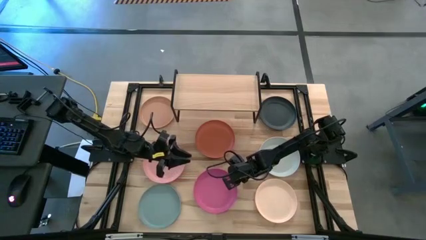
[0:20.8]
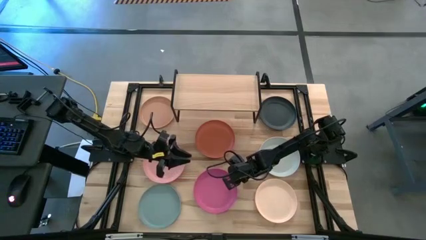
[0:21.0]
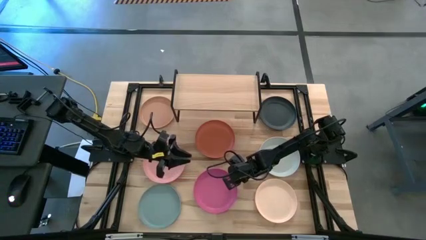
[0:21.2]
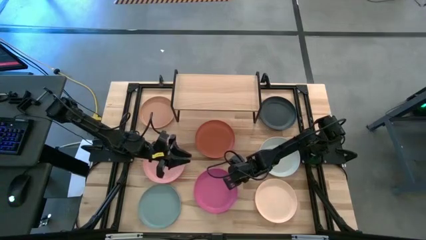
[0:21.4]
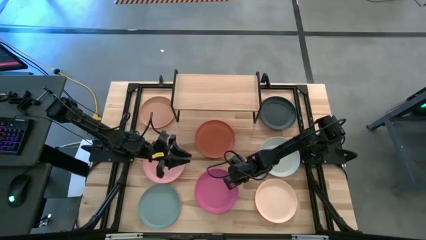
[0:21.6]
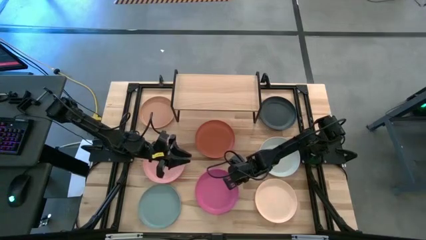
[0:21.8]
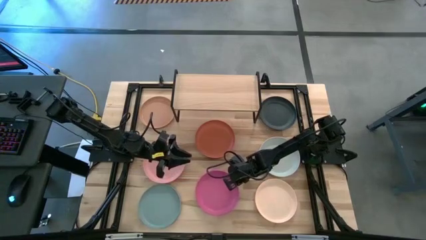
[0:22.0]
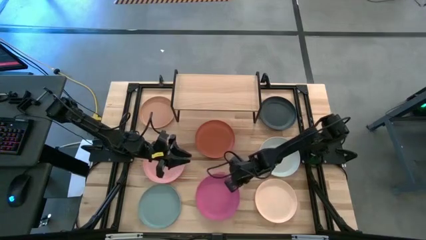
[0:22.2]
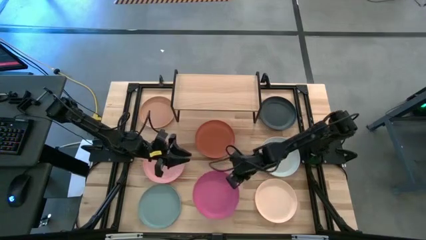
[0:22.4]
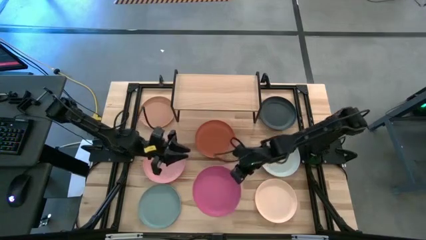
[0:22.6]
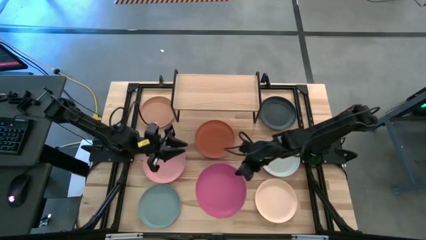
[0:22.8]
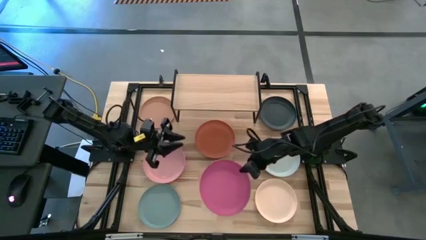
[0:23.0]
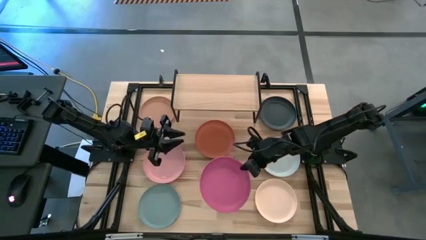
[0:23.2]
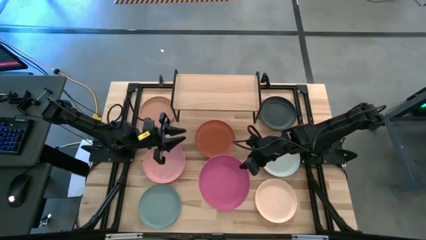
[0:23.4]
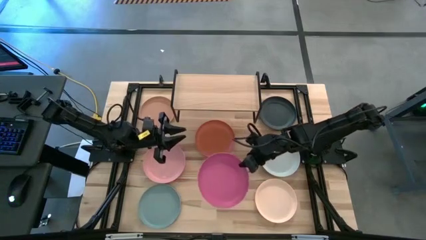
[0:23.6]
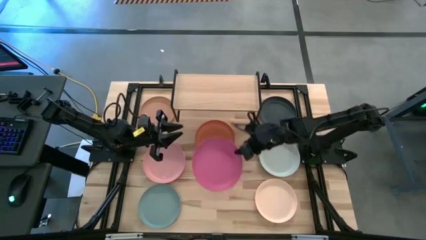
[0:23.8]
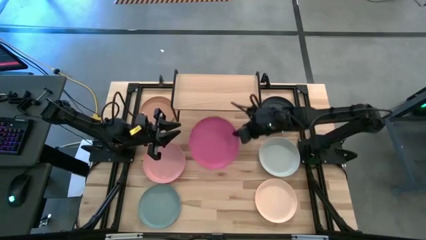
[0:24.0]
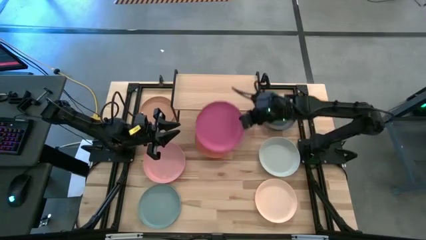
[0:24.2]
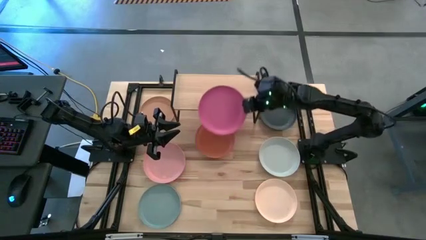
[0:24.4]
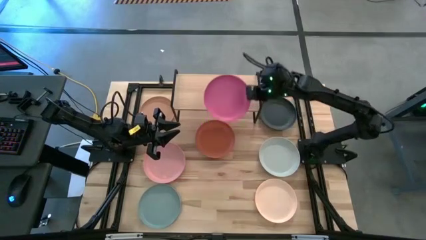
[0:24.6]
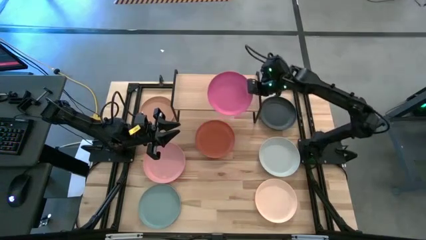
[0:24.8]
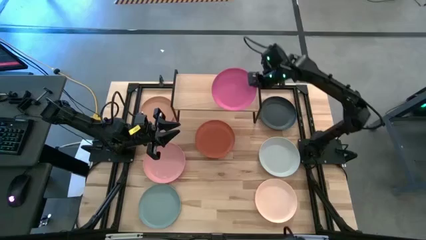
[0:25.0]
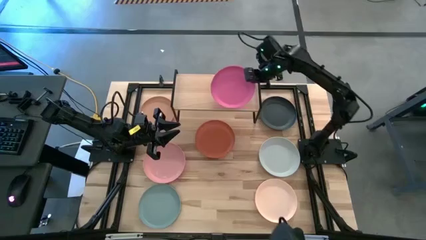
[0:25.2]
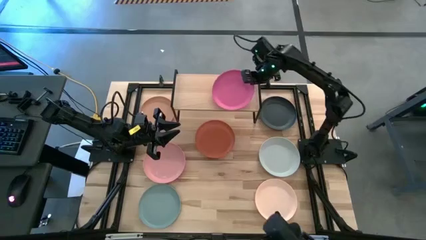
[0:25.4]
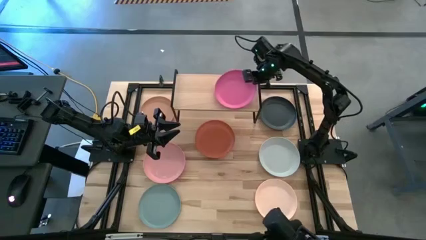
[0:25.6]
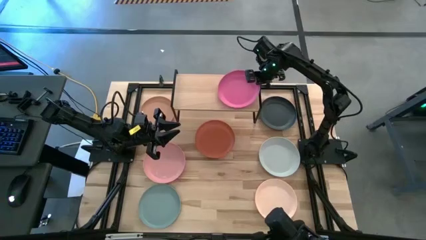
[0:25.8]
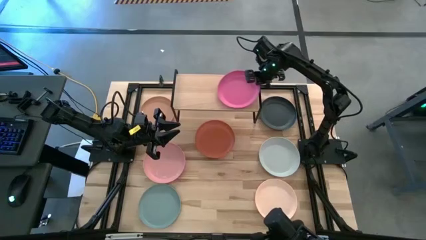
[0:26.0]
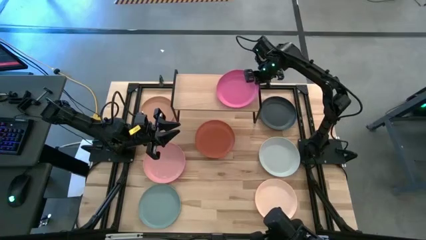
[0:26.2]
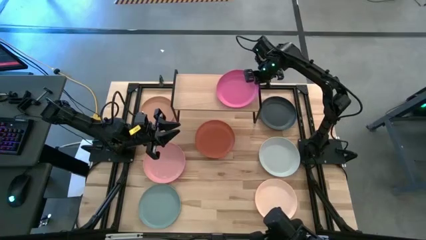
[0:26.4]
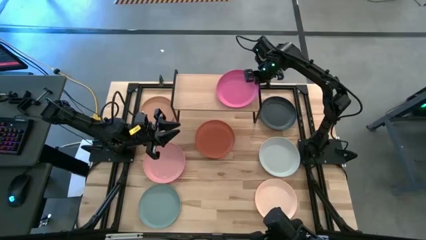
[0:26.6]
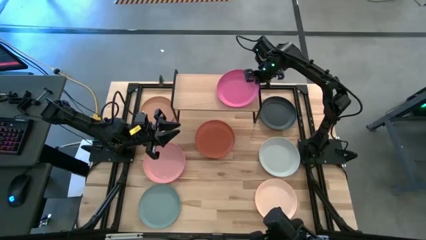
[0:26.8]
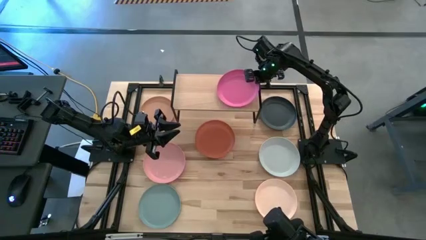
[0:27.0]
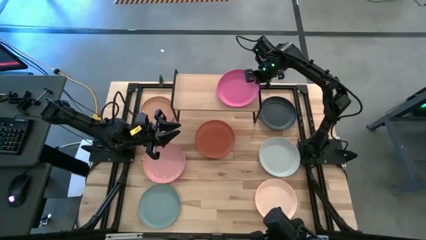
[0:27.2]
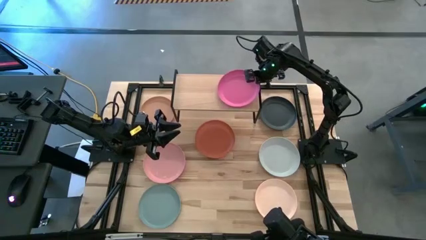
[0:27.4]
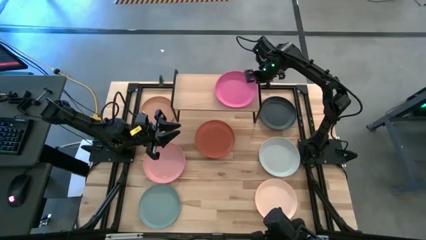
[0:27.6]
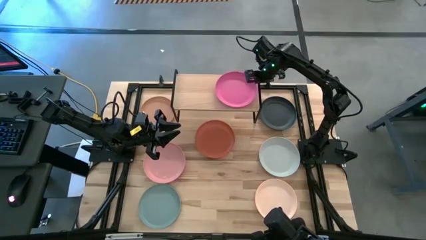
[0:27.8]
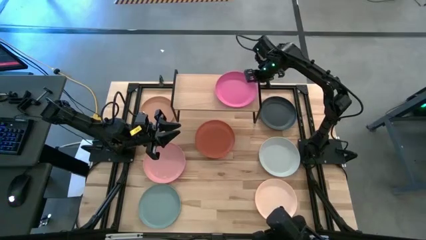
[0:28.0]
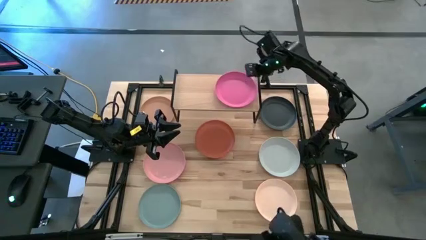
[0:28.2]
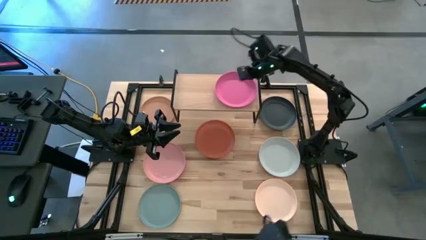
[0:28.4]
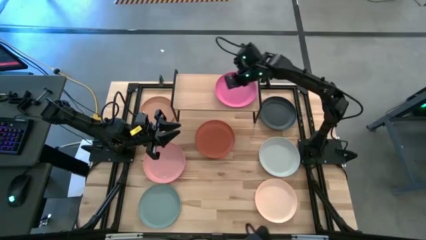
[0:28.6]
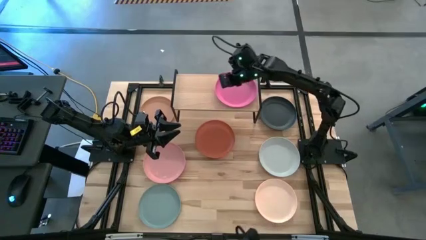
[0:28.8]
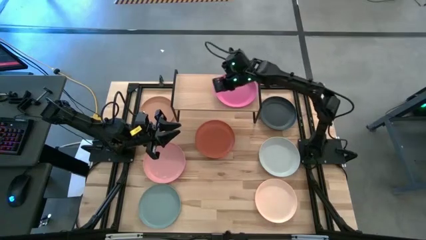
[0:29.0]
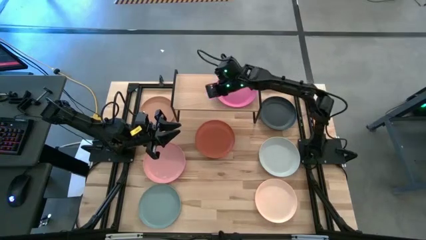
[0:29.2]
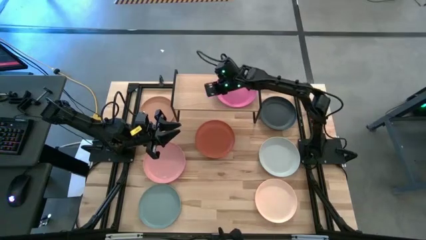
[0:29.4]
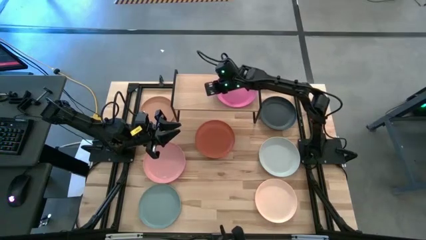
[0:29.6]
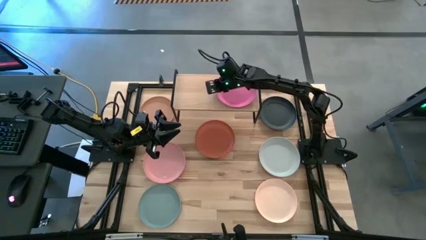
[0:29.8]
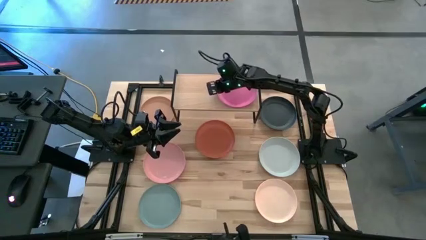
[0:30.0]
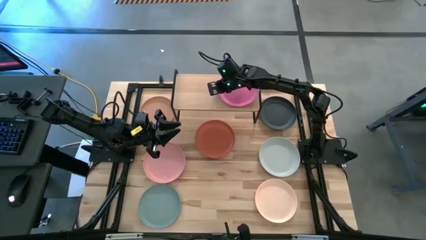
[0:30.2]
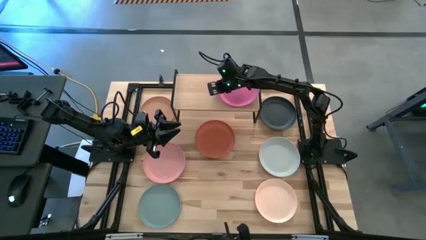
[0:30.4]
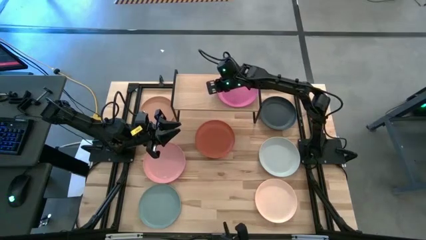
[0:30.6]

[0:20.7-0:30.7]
Task: Place and stack plates onto a shelf
Put the pink plate on the shelf

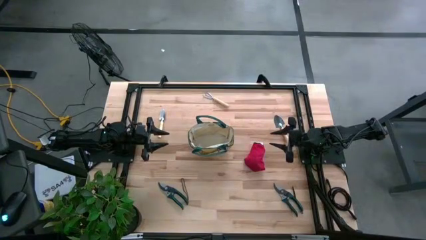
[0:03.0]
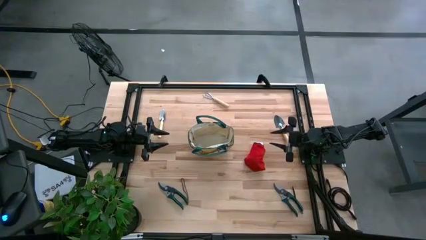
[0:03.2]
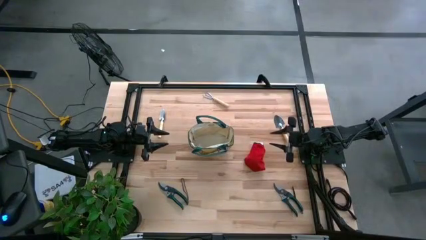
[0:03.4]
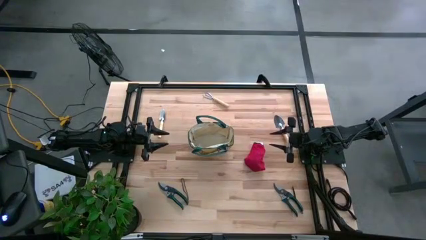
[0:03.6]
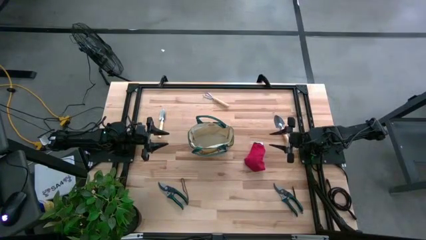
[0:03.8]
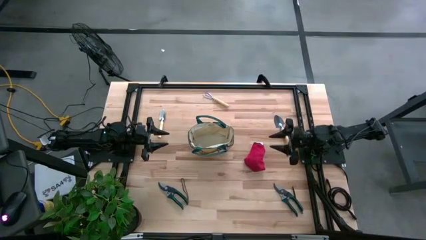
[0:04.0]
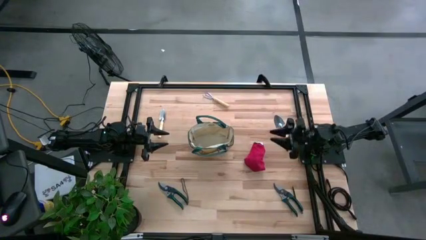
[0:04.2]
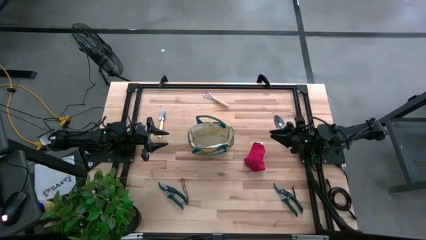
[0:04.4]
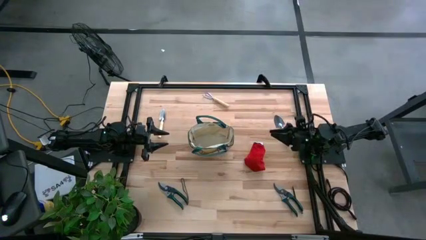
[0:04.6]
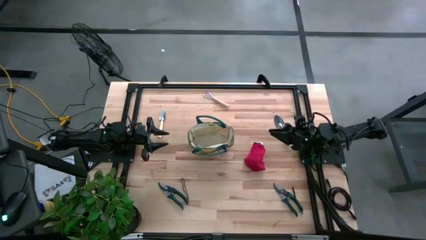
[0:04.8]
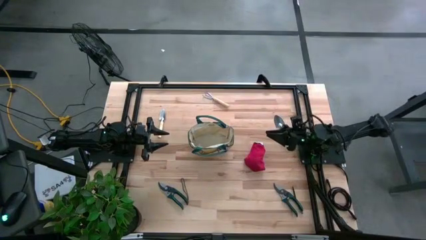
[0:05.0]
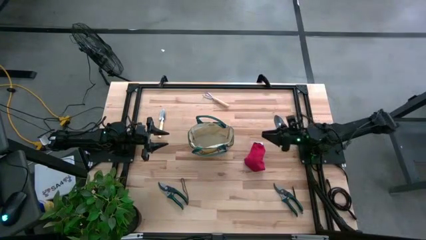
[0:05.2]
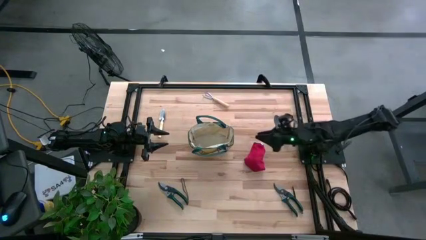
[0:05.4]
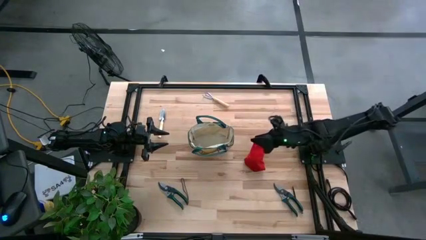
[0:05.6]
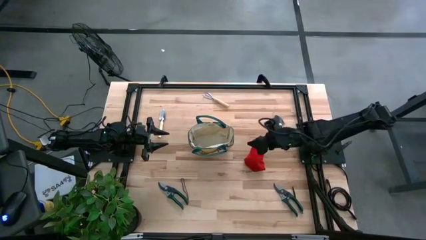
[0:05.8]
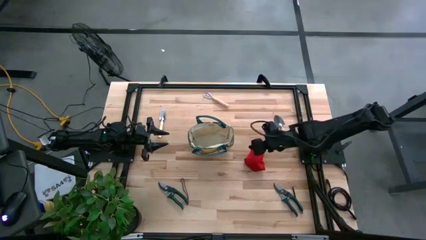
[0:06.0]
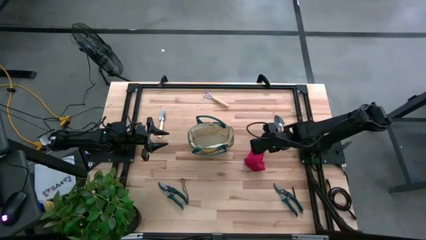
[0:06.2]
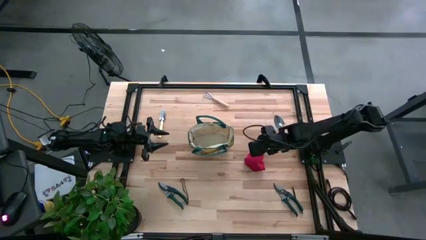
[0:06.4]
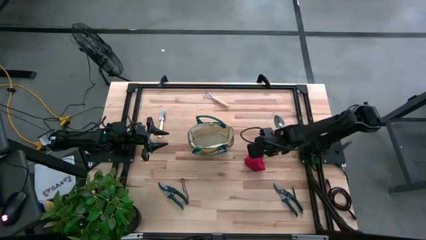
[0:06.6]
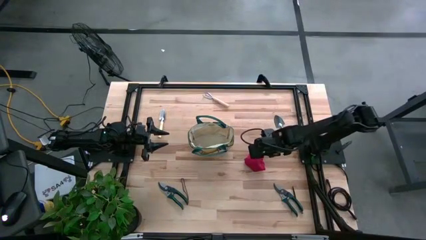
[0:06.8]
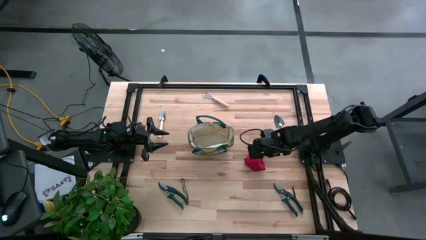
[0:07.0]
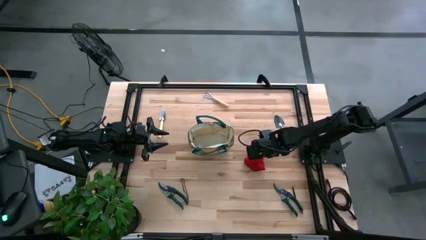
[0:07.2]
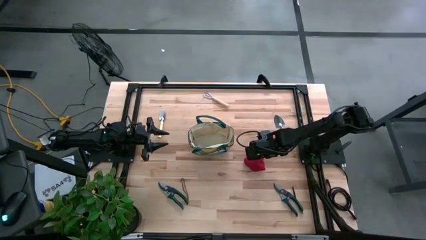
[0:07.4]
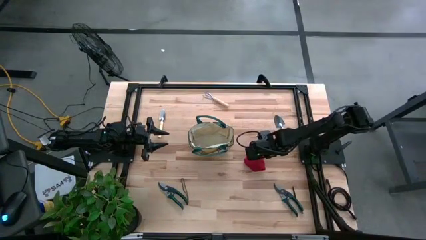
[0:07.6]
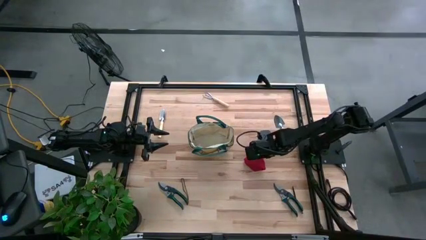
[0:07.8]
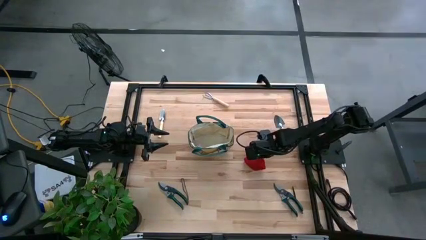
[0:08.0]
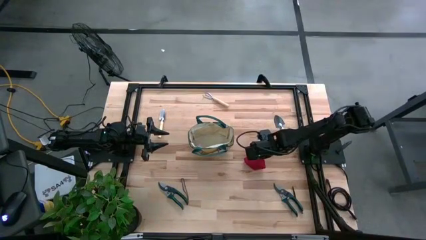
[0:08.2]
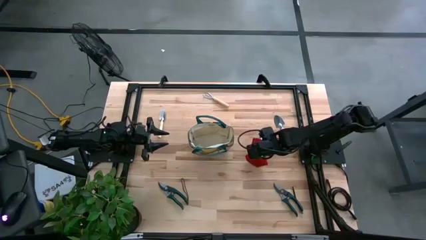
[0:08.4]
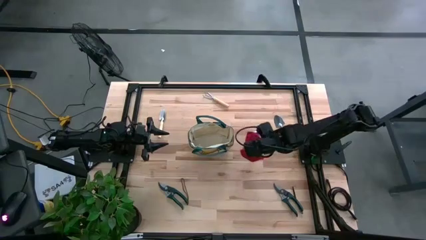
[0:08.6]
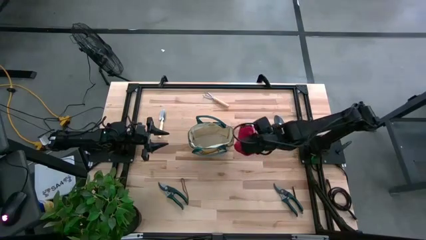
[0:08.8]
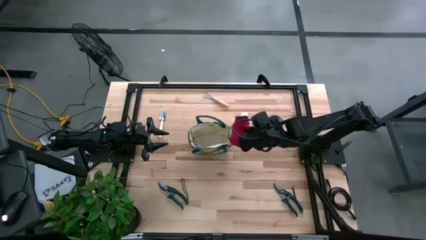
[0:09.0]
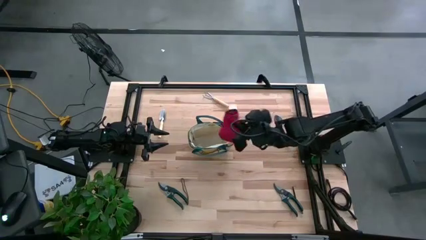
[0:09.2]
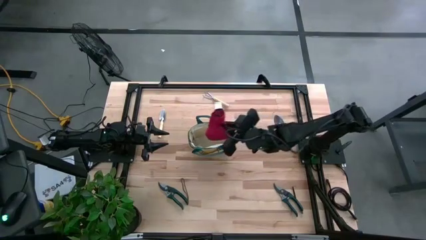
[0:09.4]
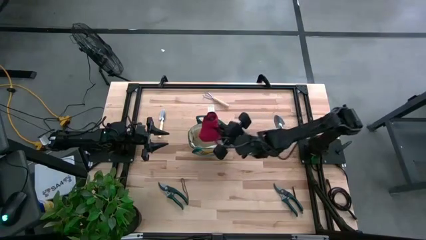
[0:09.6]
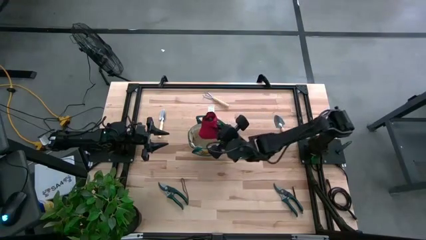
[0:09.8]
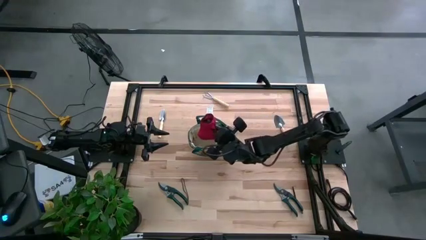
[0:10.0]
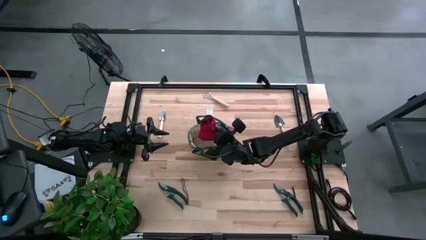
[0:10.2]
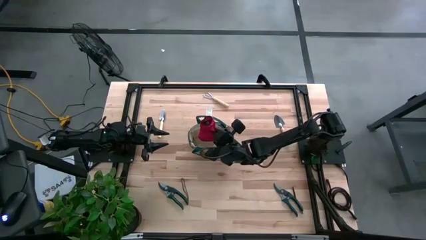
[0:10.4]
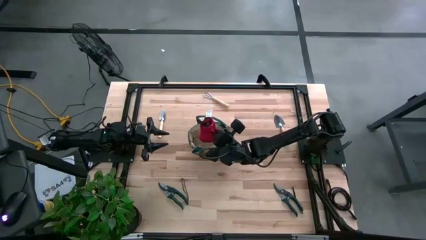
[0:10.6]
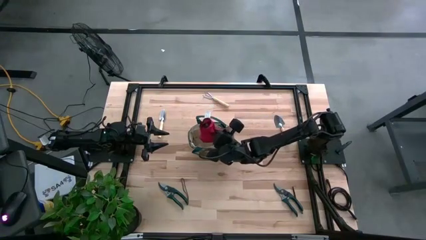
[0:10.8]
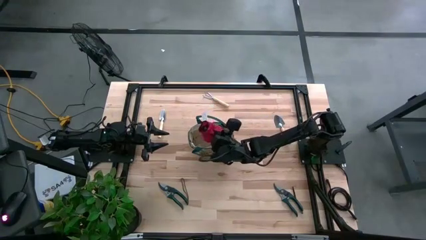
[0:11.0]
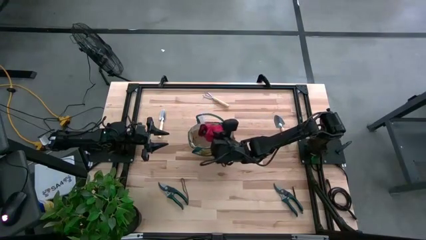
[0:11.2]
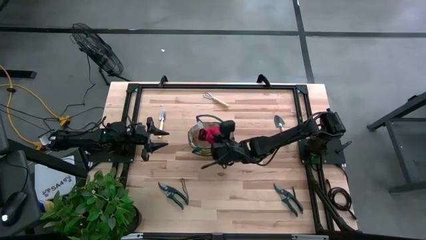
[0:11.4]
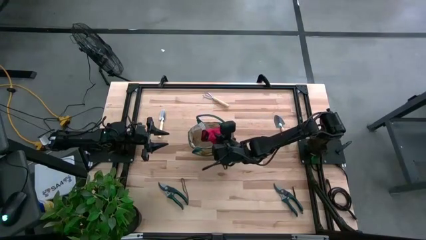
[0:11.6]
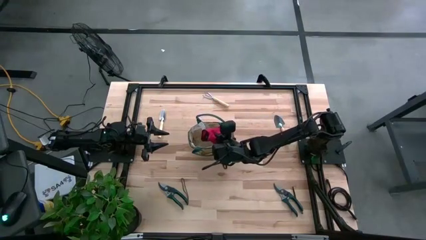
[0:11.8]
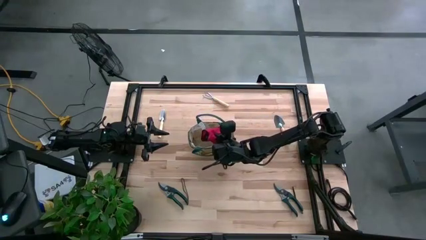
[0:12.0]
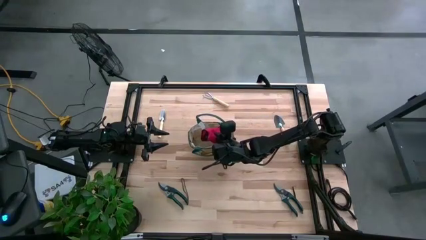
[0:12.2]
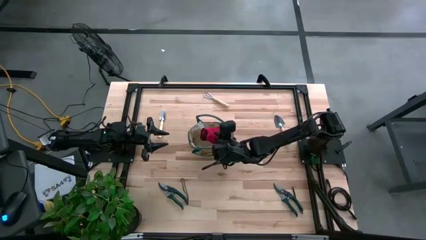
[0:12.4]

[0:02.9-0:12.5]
Task: Pick & Place Garden tools in Gardening bag
Put the red gloves into the light brown gardening bag
